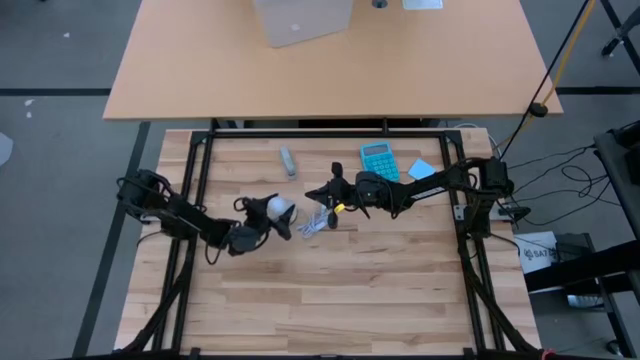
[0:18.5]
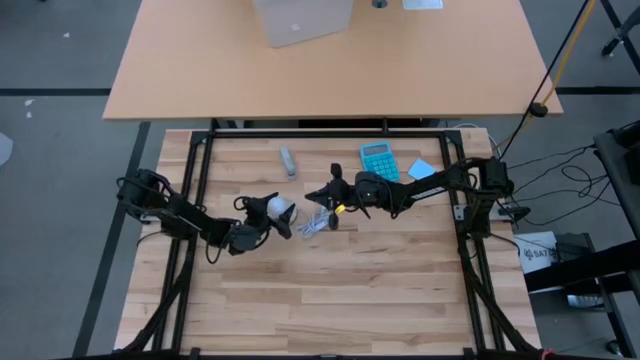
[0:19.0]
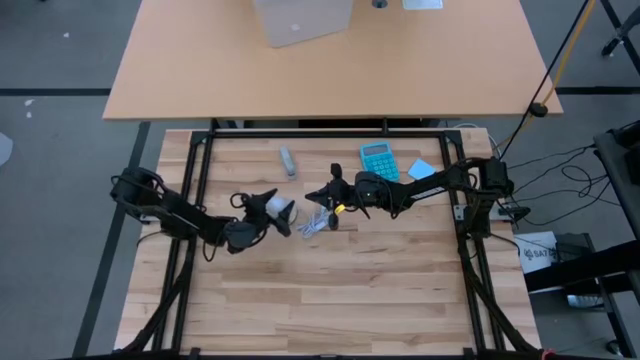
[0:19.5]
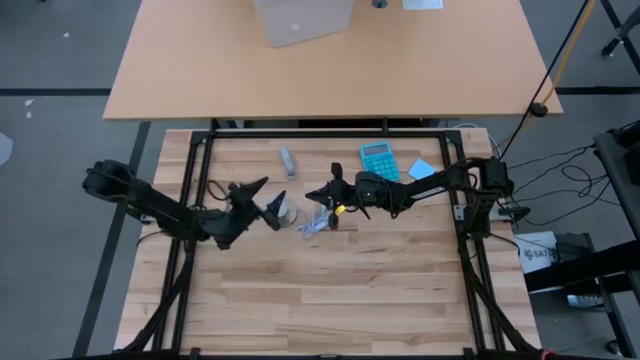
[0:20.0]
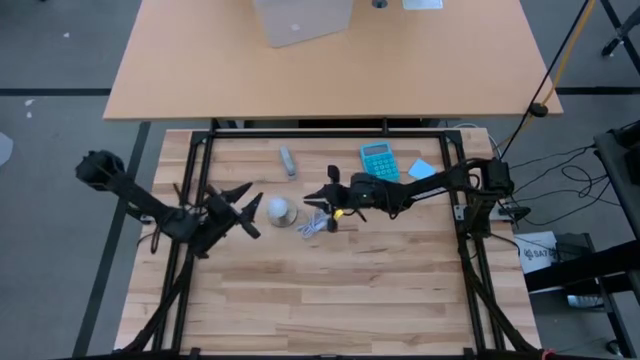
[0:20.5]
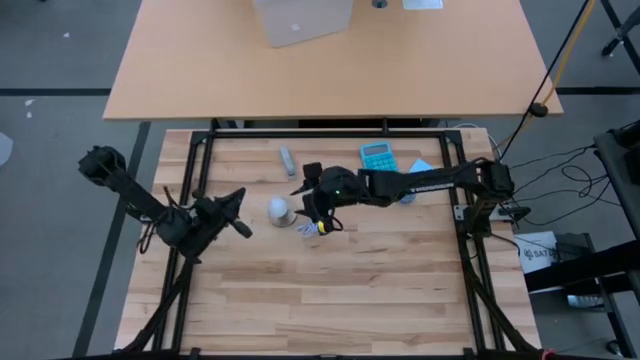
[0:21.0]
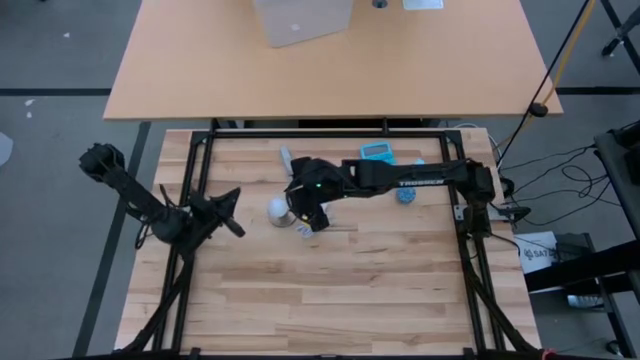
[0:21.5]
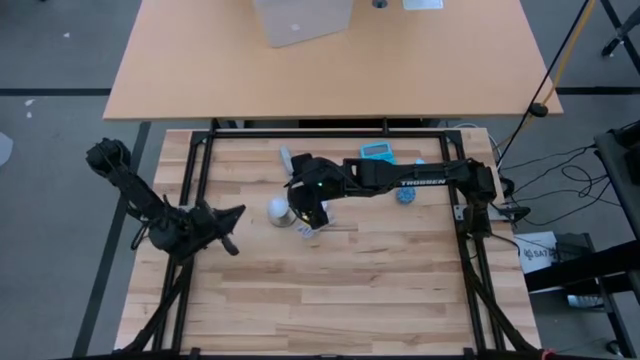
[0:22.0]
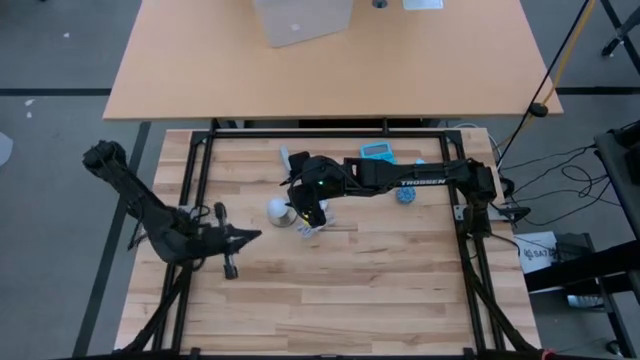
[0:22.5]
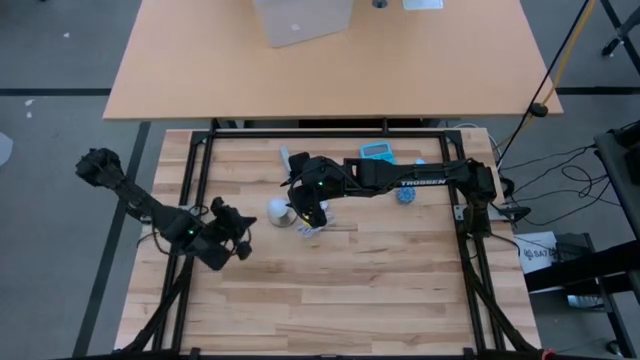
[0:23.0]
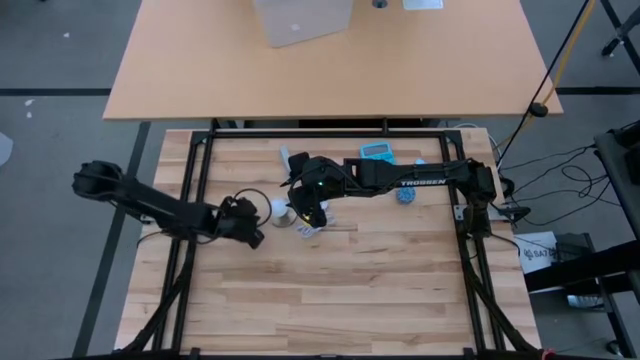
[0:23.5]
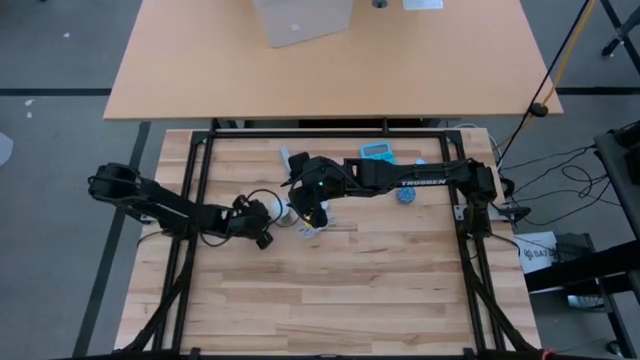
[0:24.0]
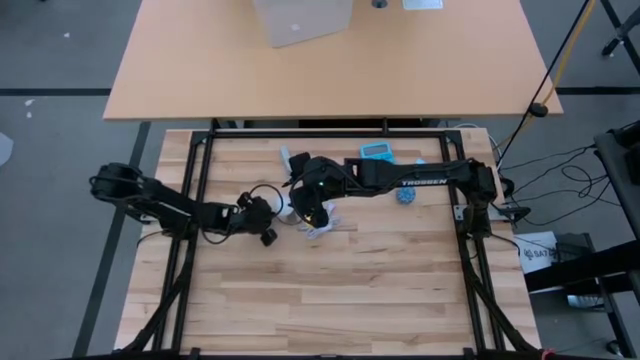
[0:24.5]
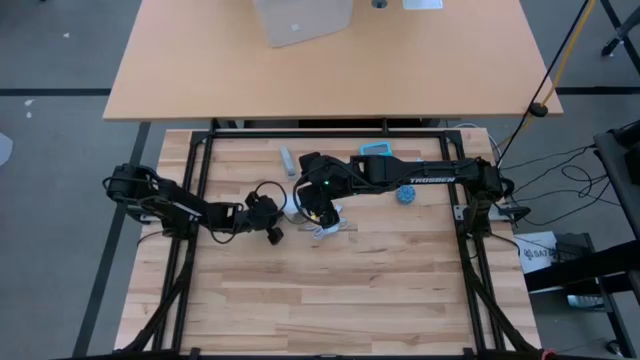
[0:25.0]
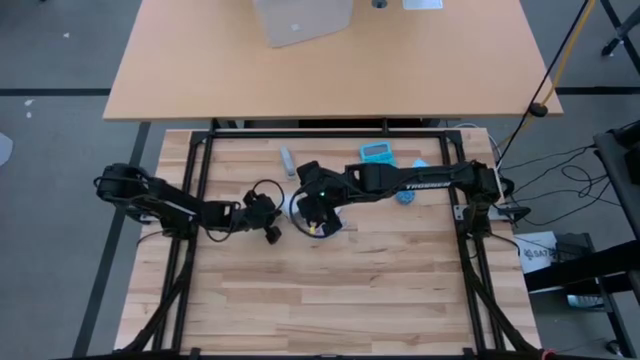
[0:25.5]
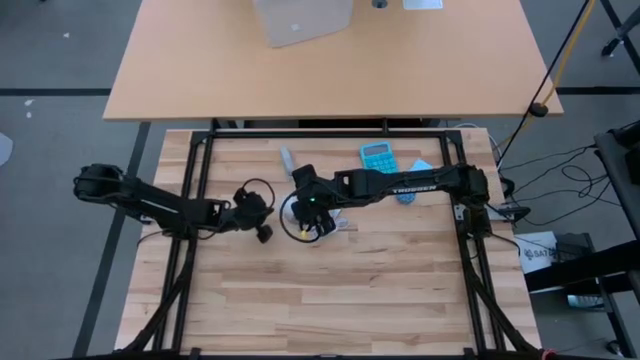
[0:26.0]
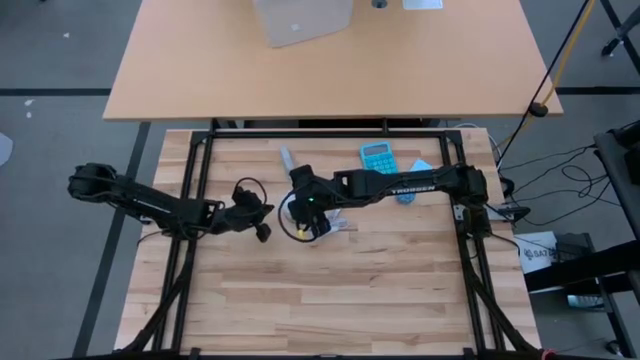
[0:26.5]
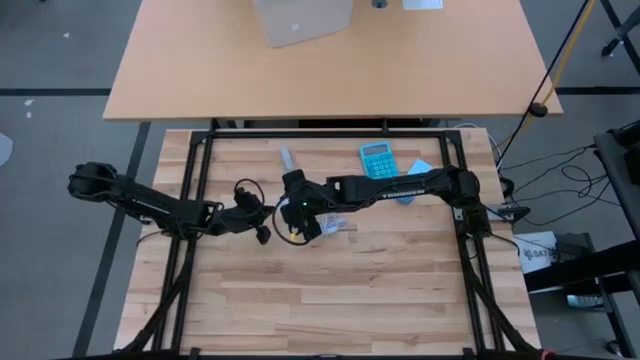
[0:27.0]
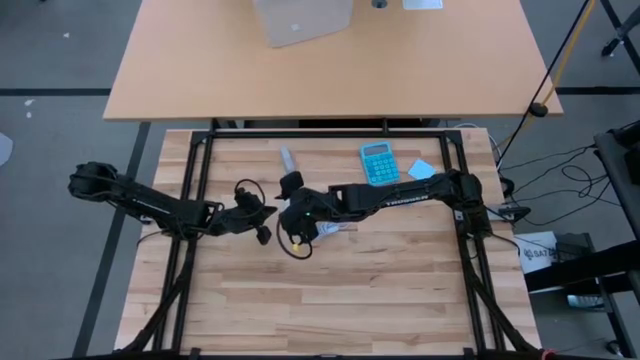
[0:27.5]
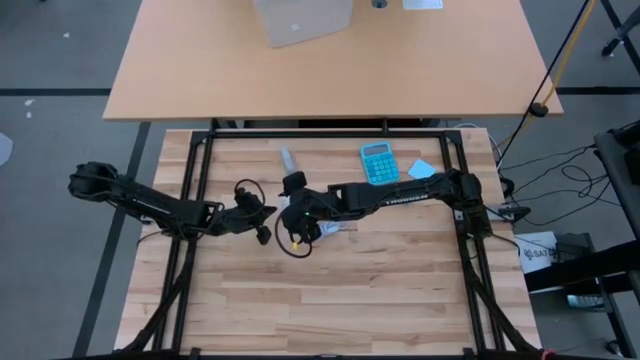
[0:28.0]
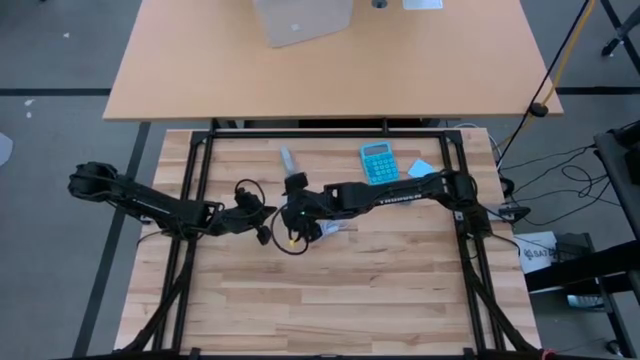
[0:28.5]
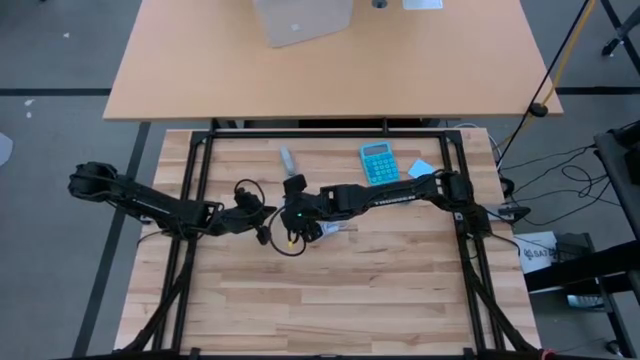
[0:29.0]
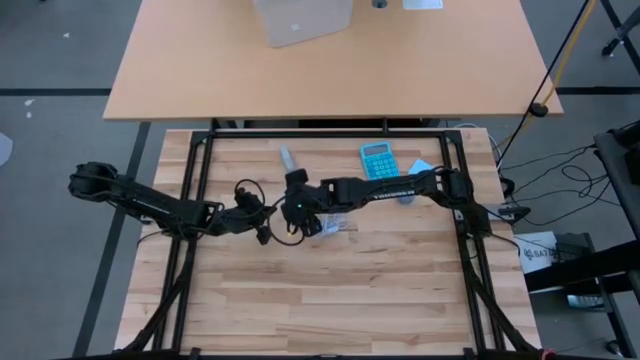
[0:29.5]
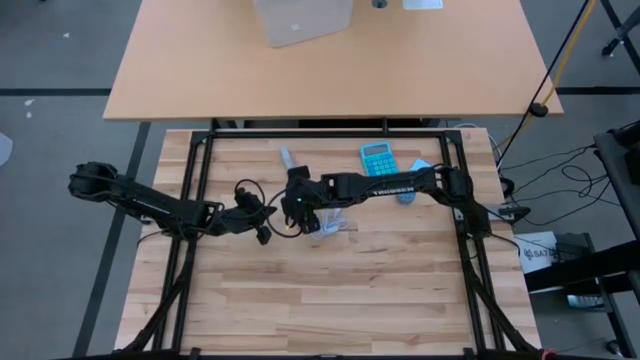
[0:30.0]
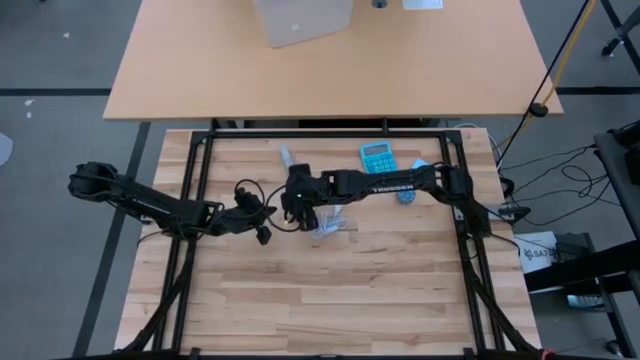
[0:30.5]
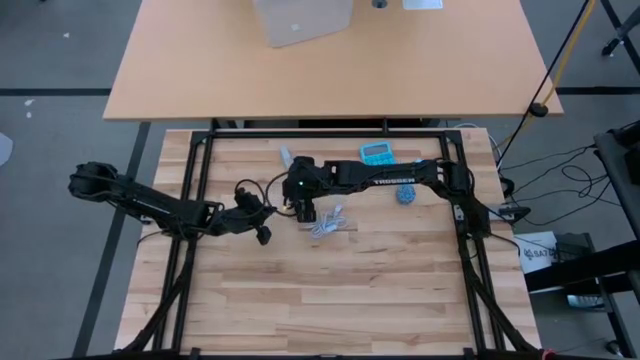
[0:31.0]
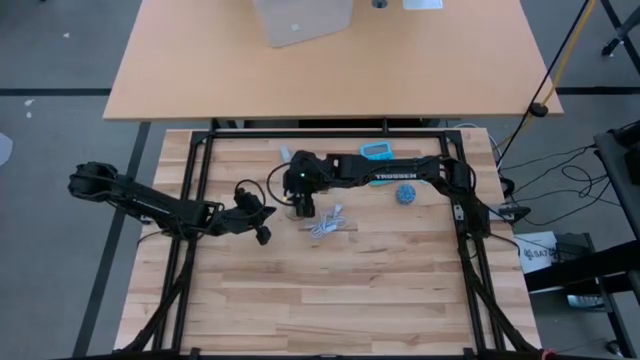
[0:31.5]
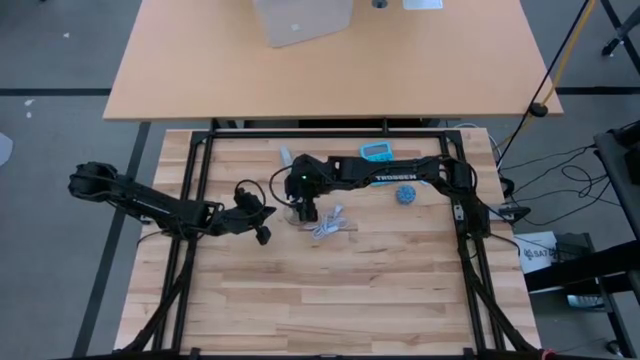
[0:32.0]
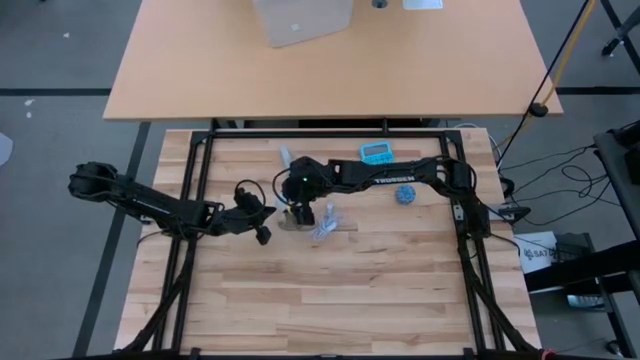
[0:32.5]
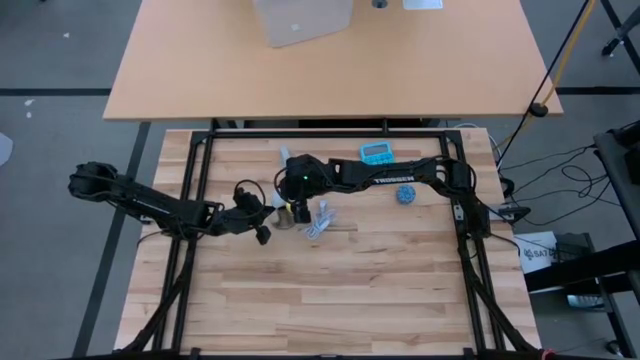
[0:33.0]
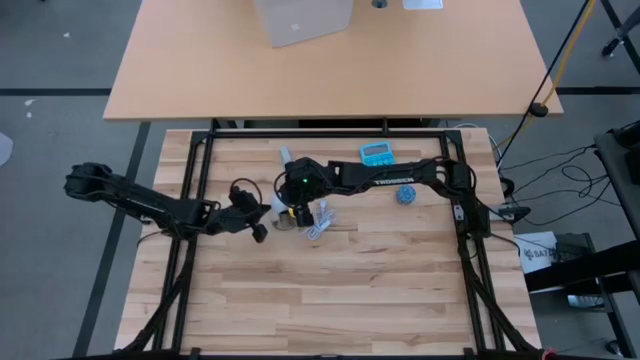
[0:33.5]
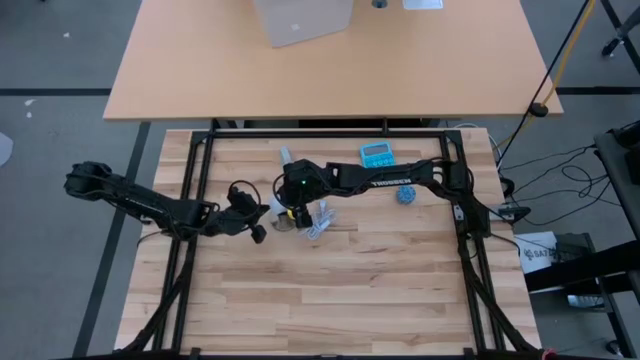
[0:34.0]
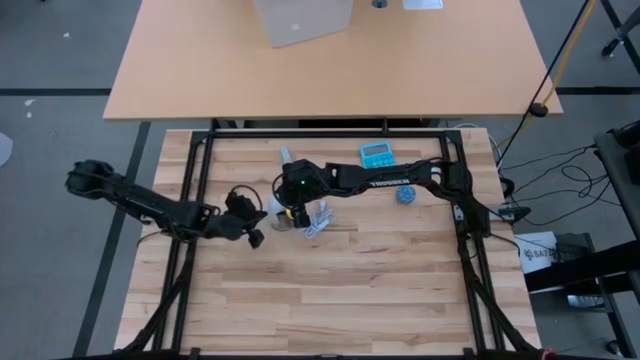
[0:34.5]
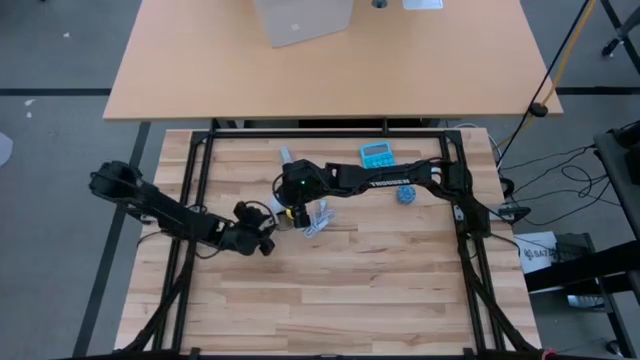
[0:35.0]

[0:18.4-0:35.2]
Task: Screw lightbulb
Insert the white lightbulb into the desk lamp

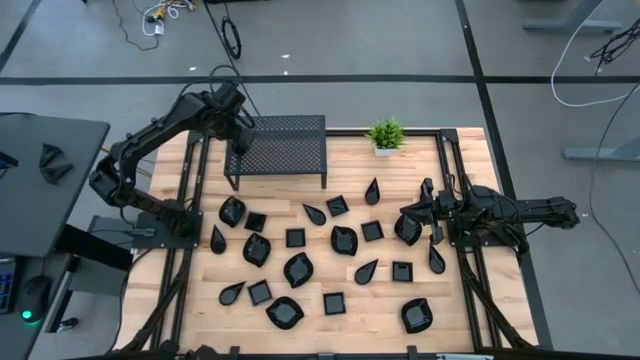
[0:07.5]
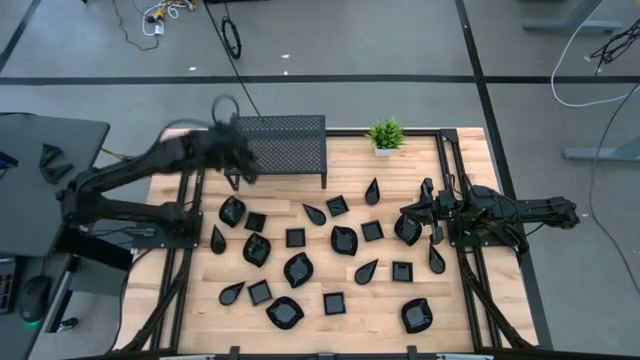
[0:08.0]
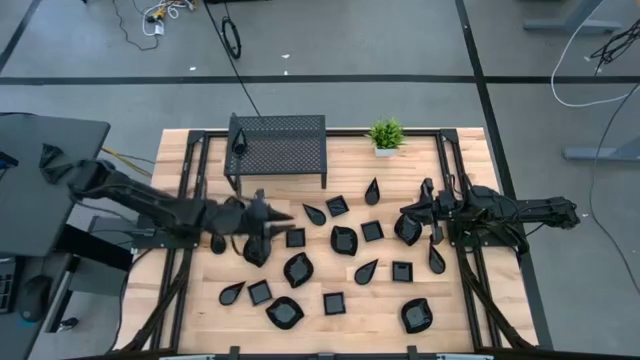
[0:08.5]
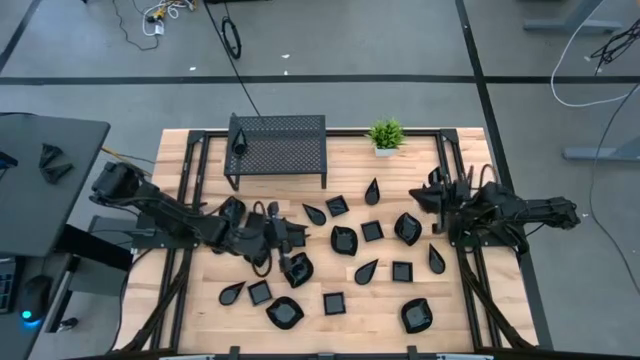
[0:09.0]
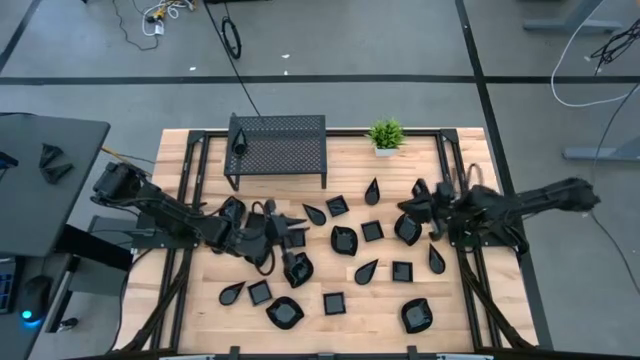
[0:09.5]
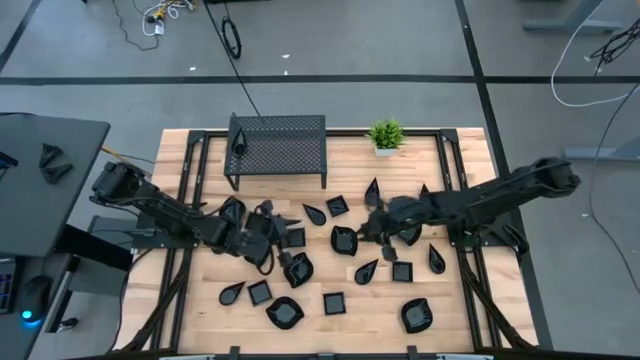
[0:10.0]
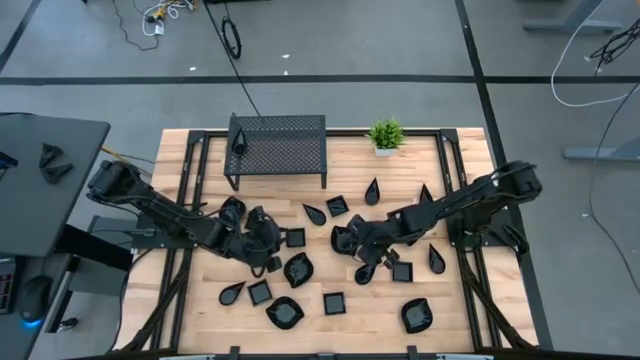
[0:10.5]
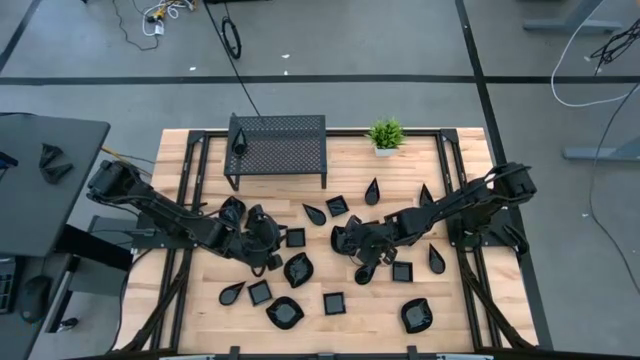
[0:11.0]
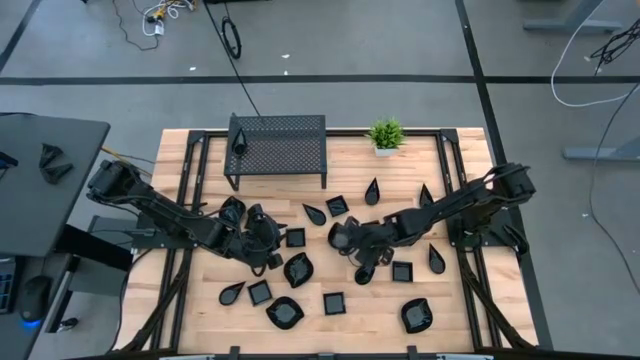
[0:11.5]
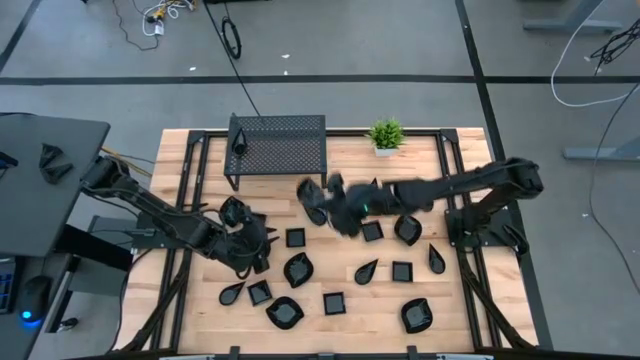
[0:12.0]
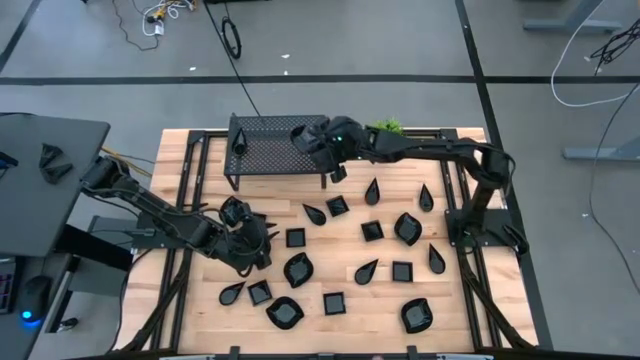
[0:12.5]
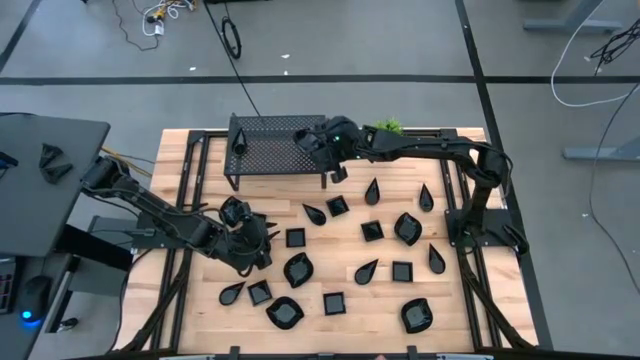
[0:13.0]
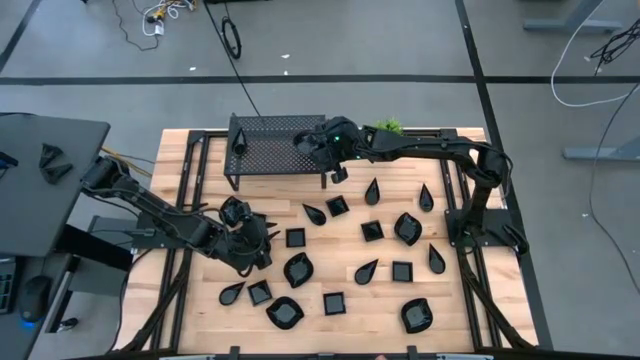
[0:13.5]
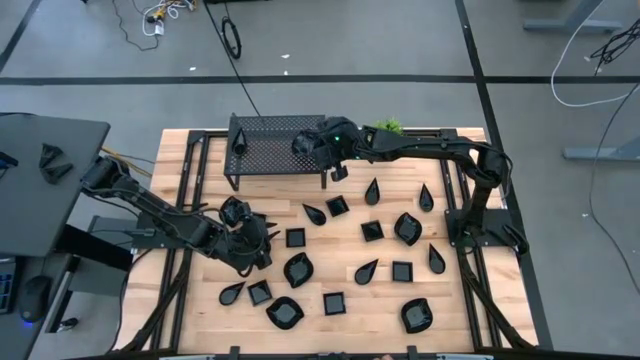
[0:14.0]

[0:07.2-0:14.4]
Task: Pick & Place Mini shaped plates
Put the black leaf shaped plate on the shelf
